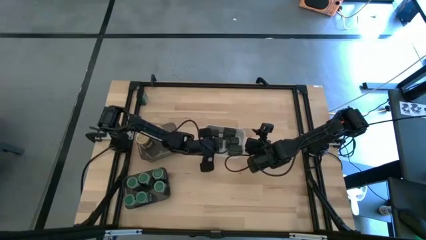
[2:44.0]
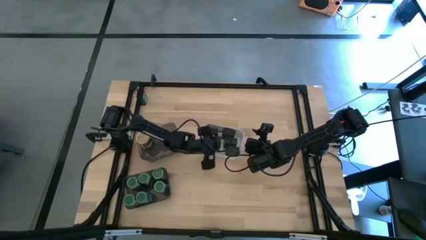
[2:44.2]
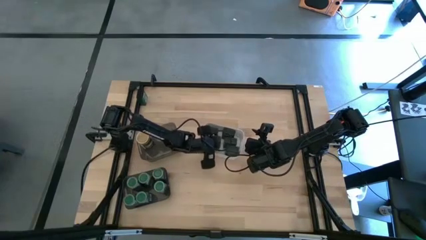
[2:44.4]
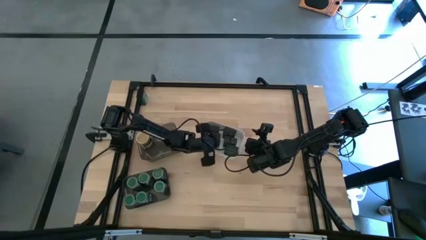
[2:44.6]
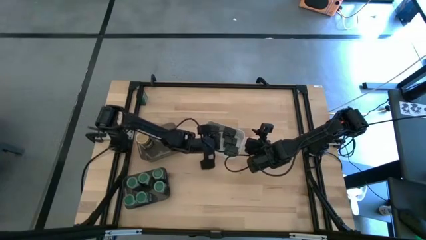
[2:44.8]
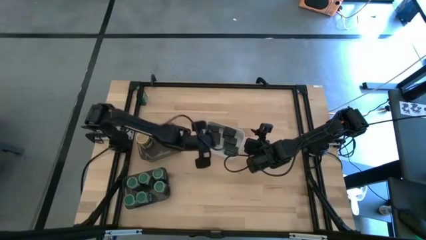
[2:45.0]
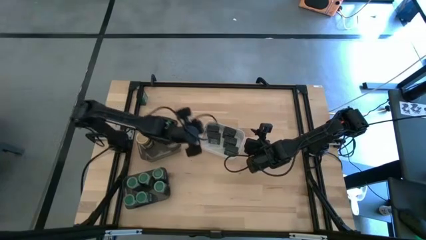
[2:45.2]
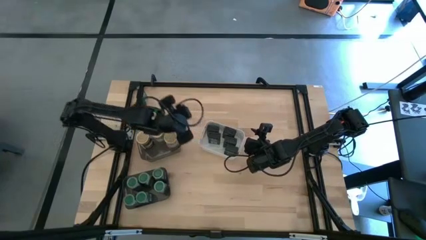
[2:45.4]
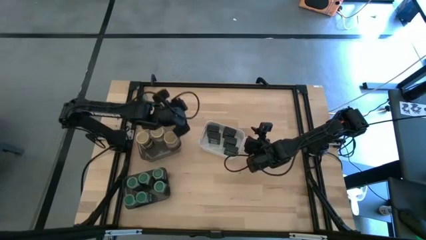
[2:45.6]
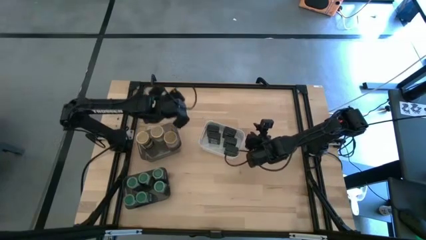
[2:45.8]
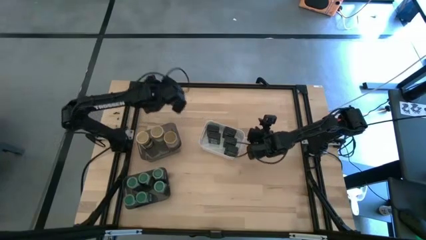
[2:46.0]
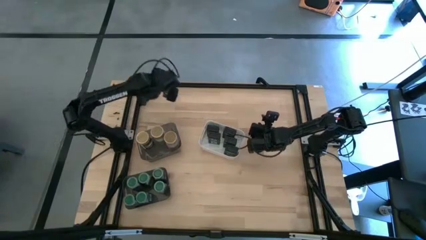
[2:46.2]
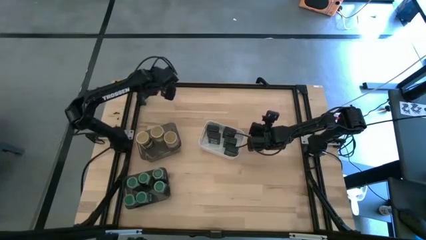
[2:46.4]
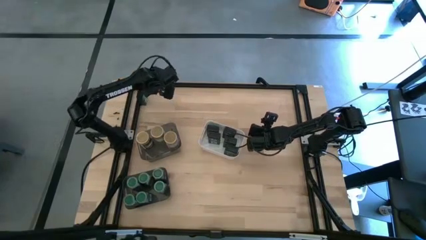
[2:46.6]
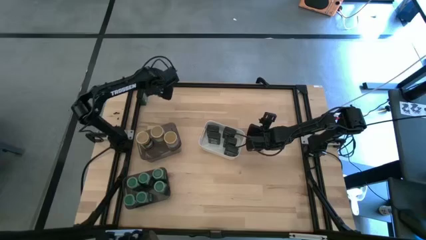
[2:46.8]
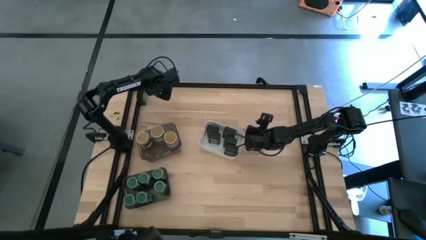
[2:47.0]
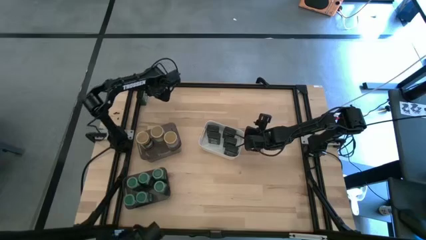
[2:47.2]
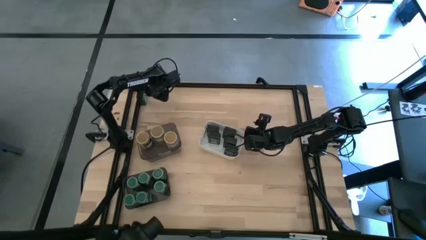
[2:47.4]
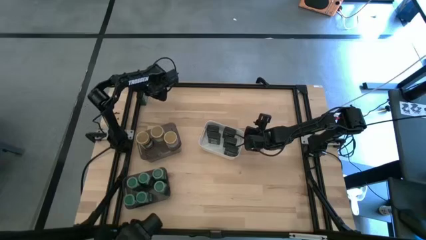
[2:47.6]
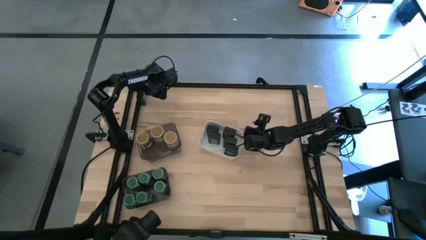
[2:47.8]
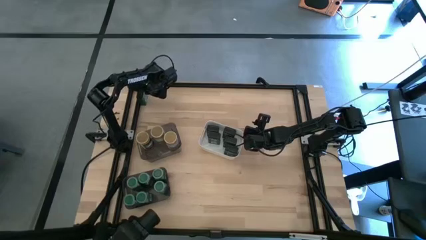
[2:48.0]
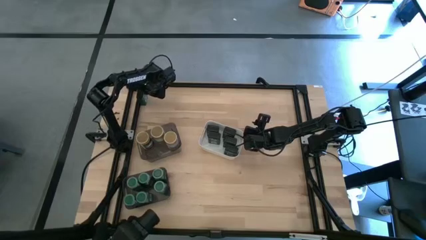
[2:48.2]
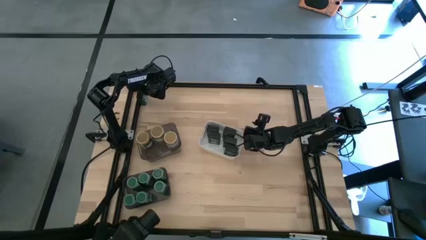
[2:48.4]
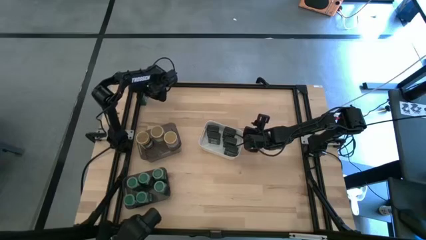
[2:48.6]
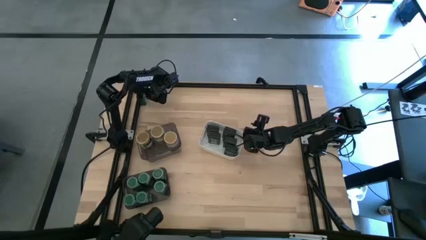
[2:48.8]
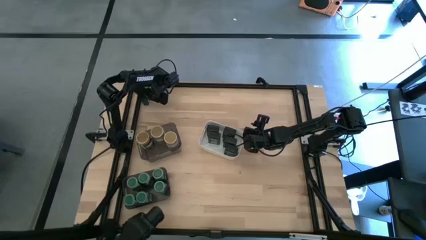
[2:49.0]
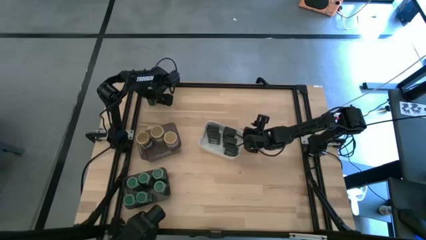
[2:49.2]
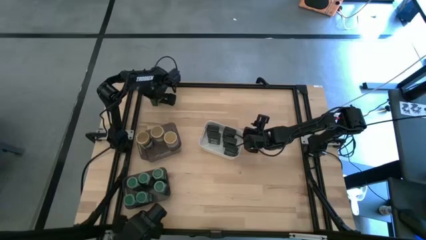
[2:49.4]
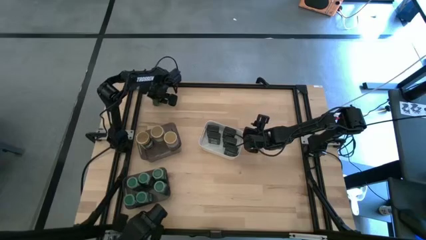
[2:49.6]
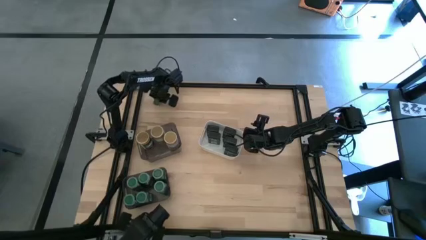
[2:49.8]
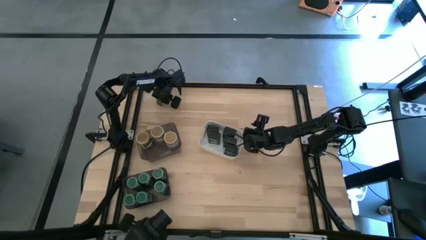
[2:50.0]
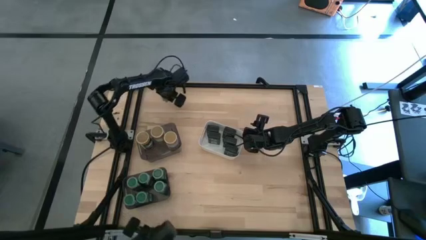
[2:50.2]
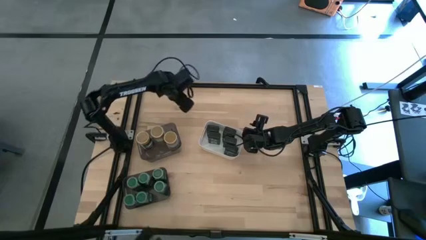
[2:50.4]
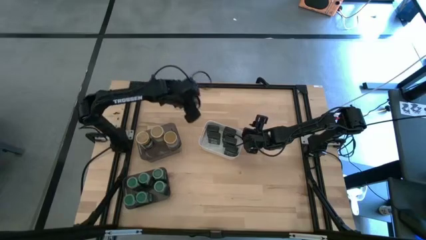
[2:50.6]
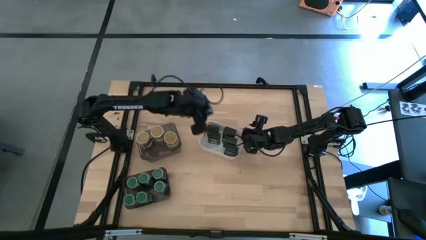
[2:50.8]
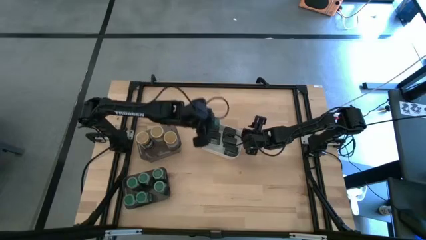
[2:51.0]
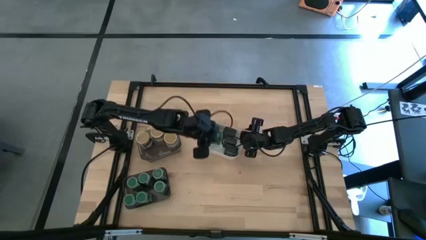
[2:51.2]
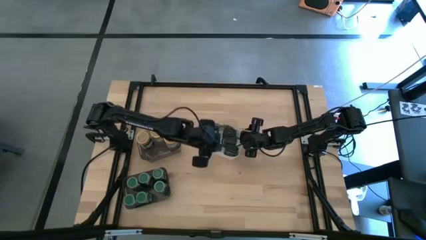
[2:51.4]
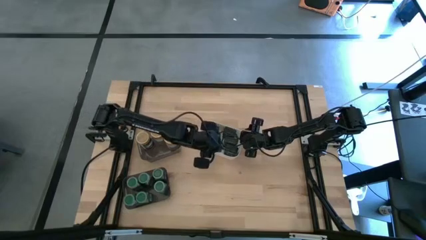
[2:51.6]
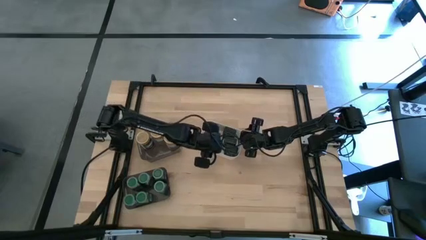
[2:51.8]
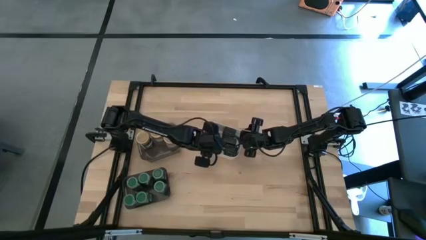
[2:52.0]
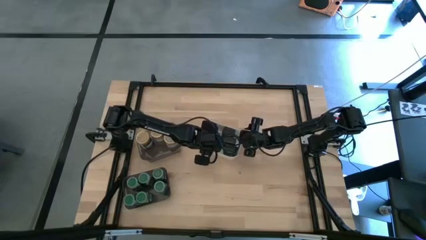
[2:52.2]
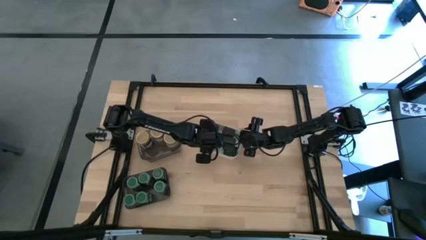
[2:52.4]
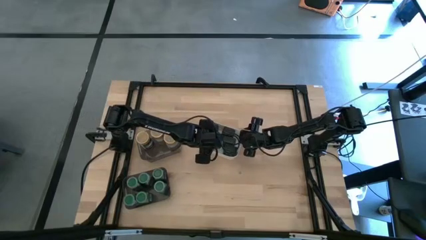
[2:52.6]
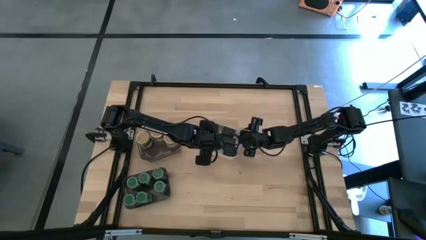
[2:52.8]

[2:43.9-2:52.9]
Task: Sort spices by type
Put the black seasoning can into the white bin

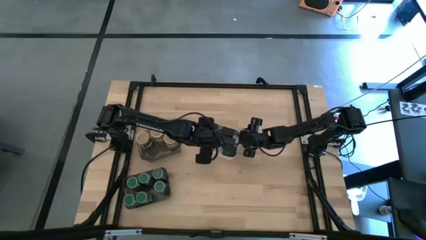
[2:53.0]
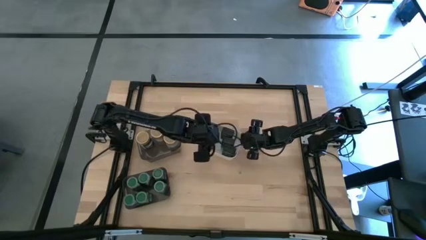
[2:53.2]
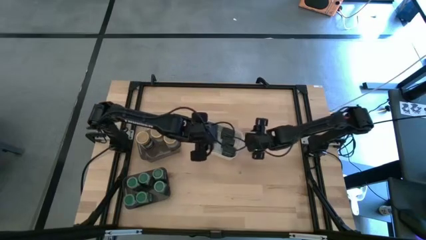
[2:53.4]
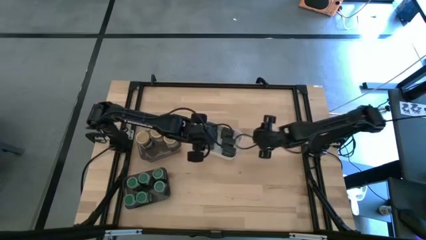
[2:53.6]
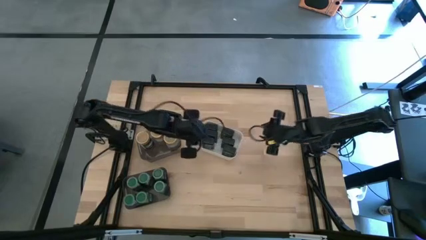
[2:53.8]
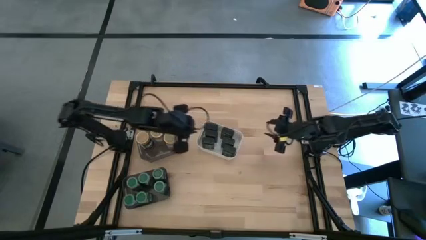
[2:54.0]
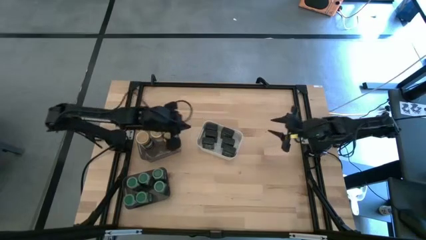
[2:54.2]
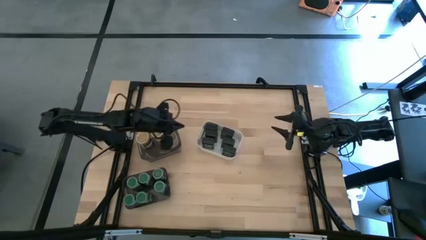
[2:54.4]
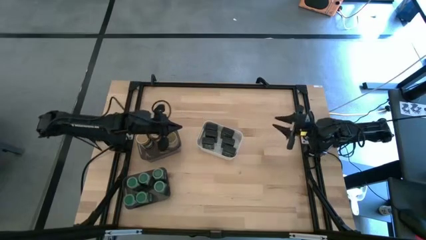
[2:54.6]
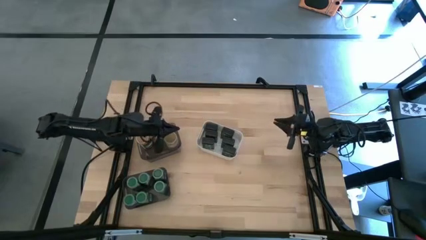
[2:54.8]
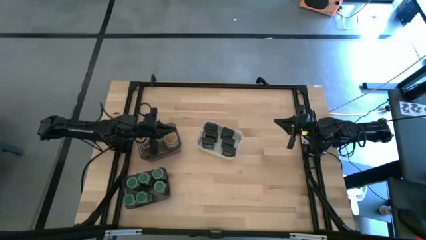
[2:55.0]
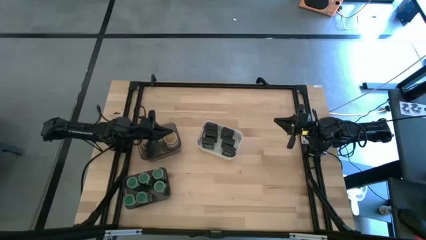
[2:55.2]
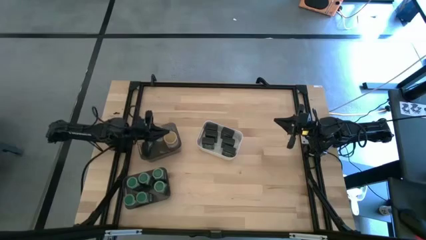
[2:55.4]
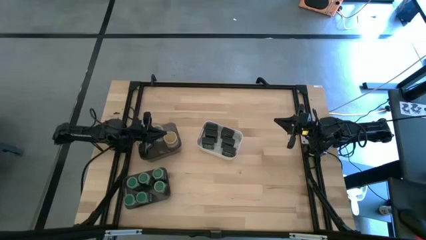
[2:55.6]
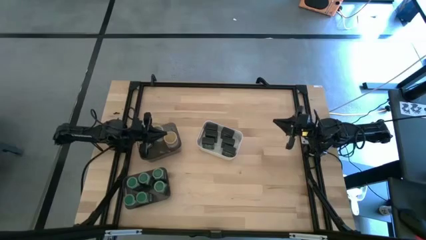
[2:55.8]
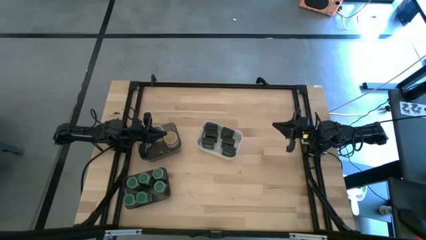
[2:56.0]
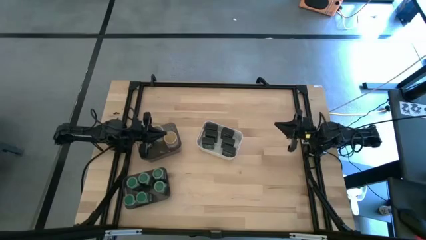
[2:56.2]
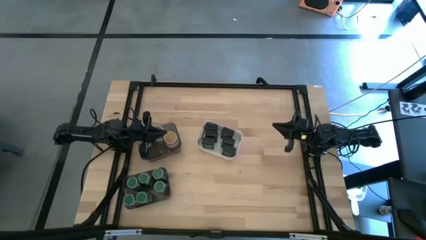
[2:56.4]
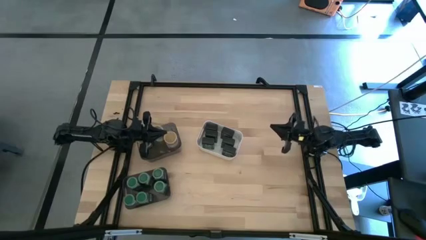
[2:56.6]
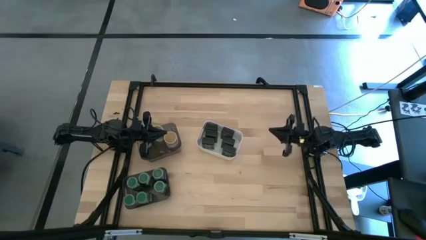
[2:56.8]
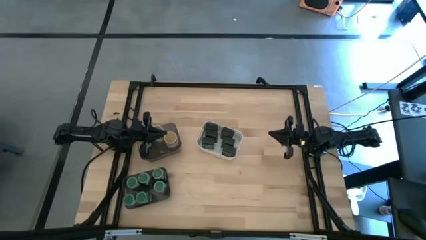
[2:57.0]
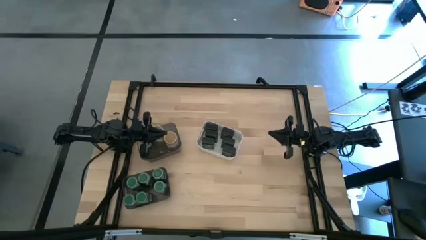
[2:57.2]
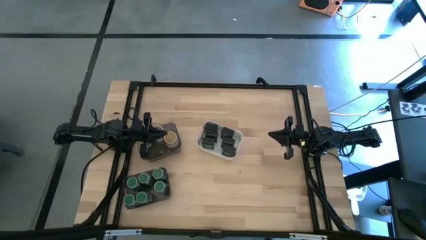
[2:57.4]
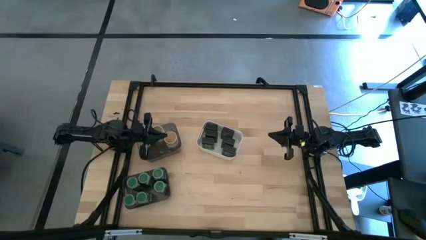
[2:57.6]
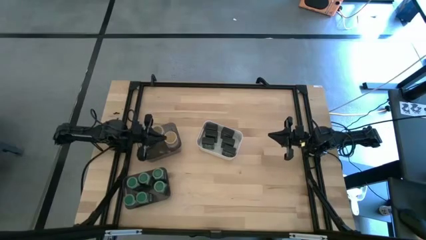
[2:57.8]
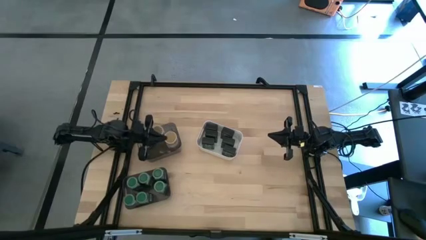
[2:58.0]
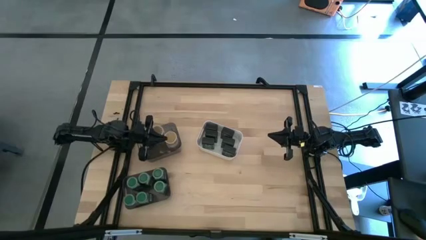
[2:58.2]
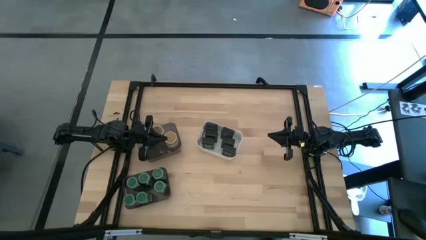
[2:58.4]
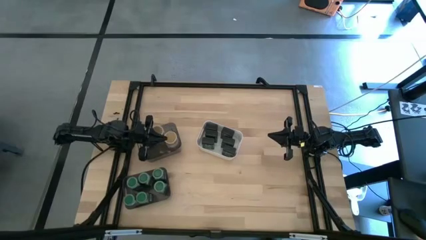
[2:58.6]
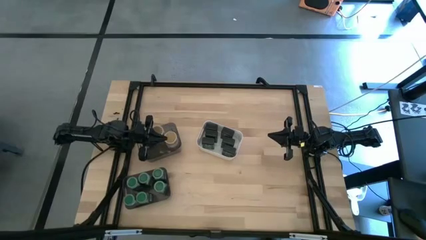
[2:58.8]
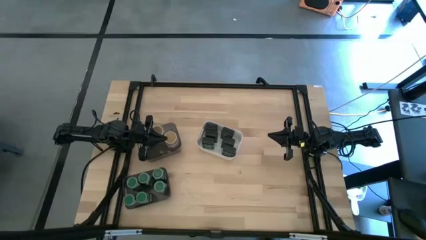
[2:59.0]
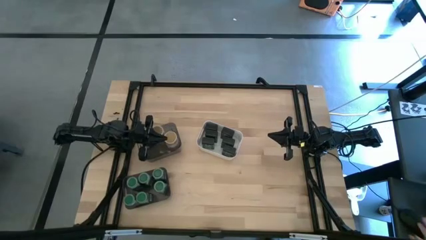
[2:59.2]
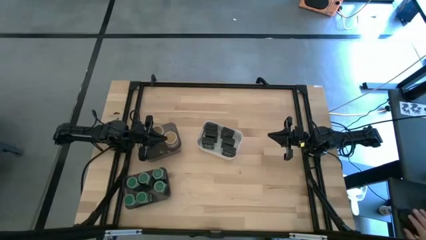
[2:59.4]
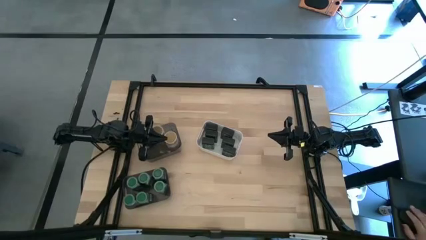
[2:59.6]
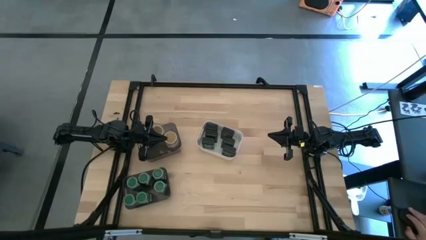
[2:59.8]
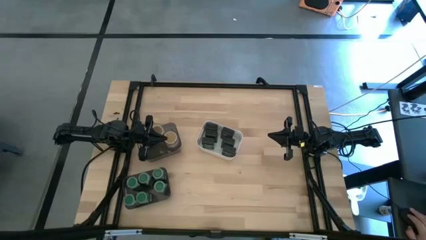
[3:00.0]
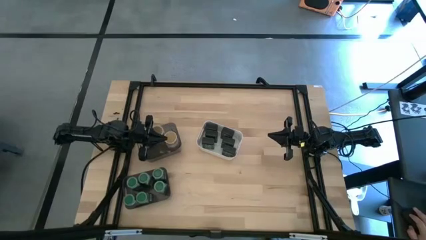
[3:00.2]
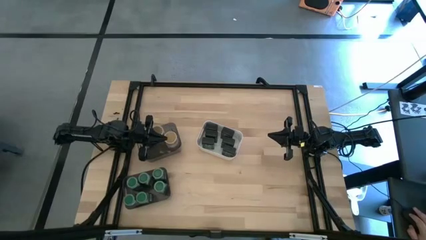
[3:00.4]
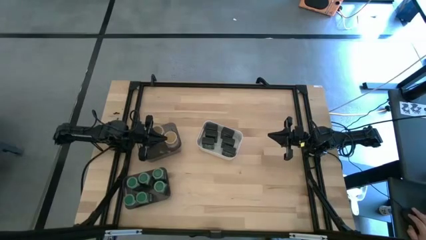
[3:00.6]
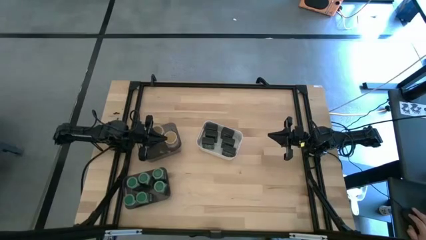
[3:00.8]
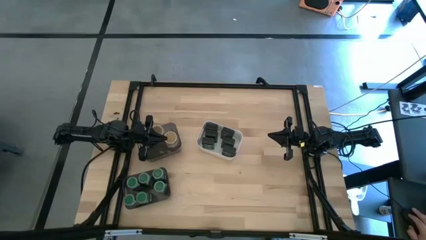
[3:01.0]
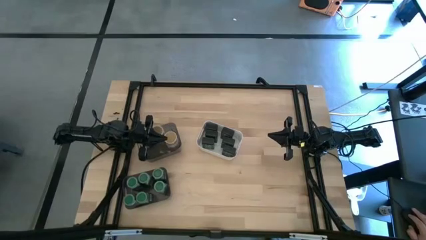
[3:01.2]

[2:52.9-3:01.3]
Return to Home Position
